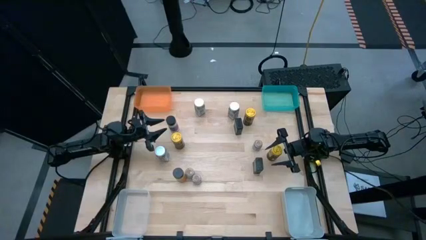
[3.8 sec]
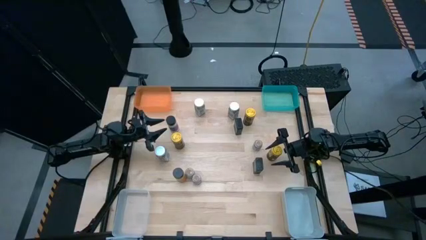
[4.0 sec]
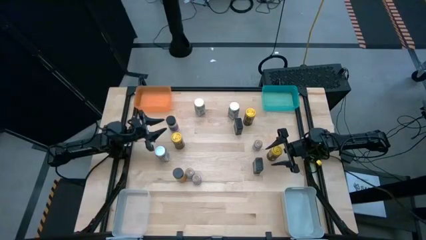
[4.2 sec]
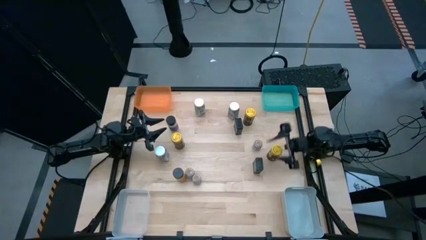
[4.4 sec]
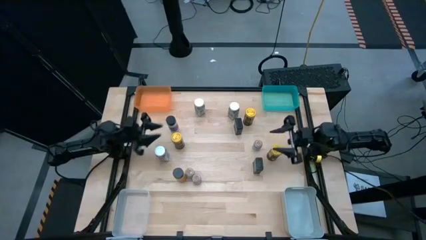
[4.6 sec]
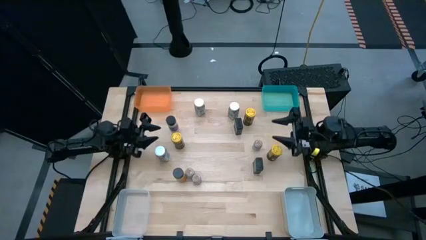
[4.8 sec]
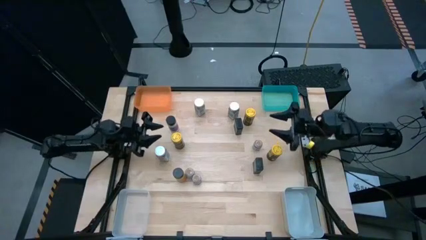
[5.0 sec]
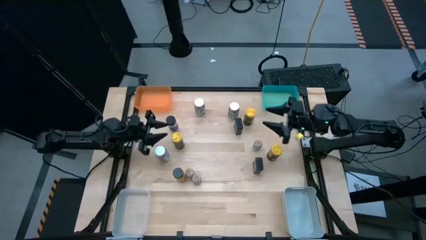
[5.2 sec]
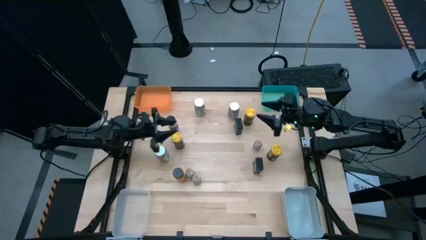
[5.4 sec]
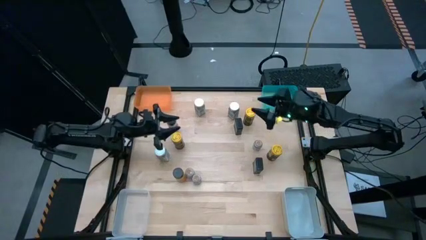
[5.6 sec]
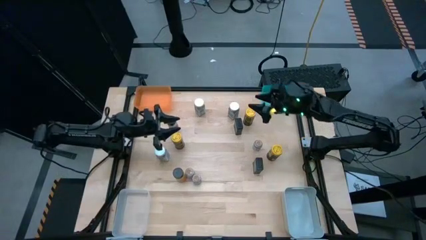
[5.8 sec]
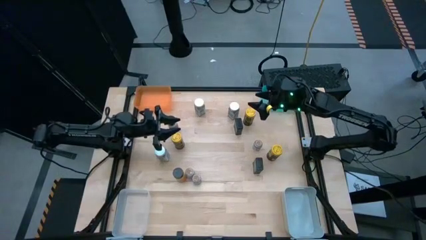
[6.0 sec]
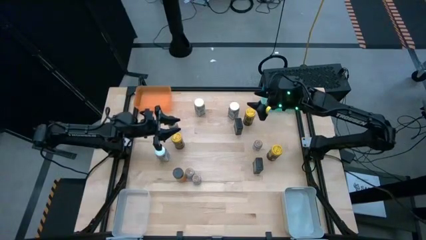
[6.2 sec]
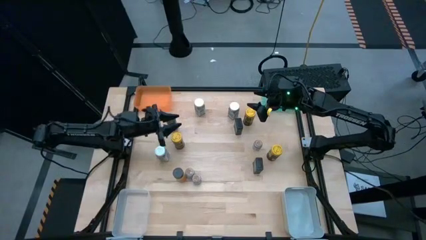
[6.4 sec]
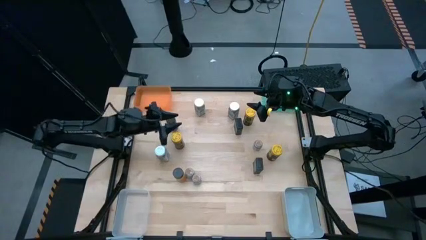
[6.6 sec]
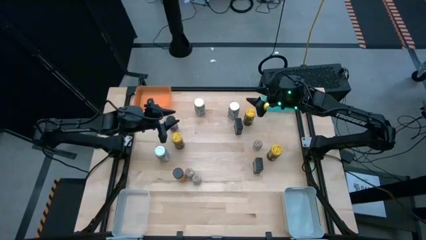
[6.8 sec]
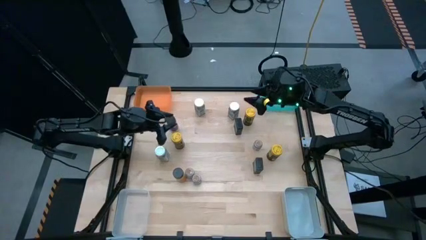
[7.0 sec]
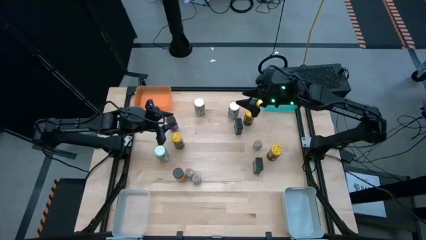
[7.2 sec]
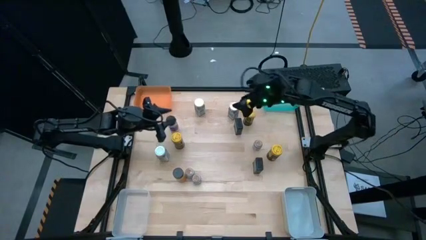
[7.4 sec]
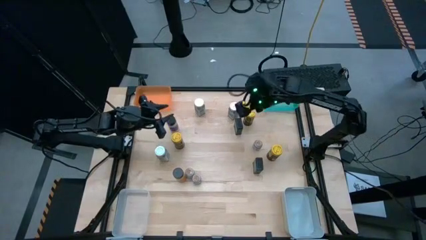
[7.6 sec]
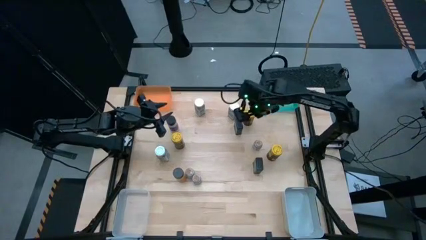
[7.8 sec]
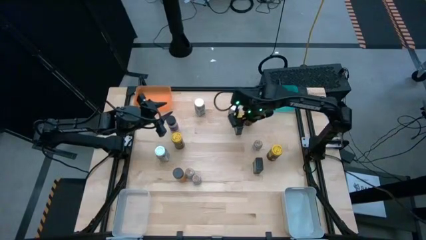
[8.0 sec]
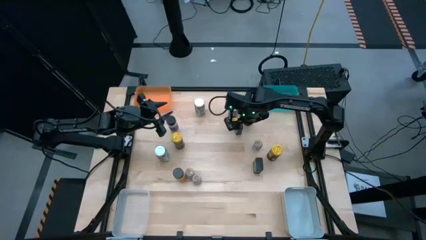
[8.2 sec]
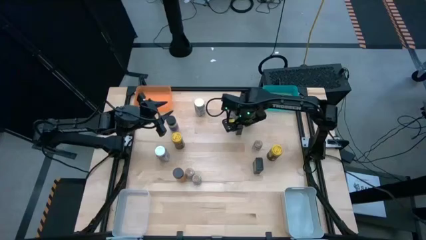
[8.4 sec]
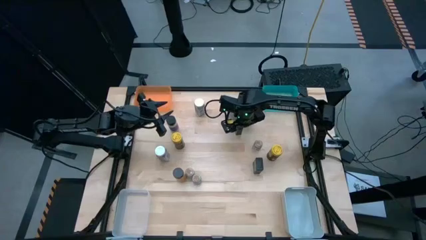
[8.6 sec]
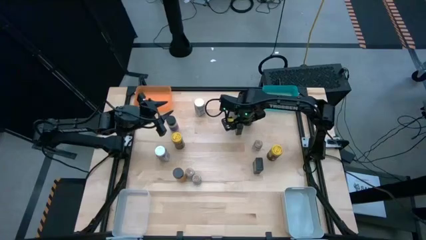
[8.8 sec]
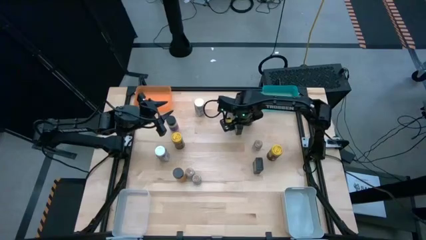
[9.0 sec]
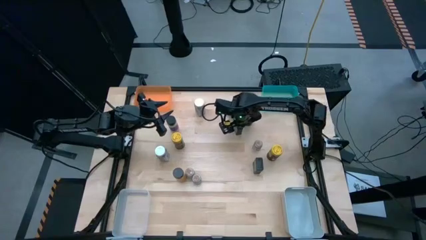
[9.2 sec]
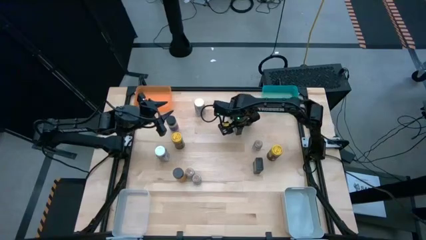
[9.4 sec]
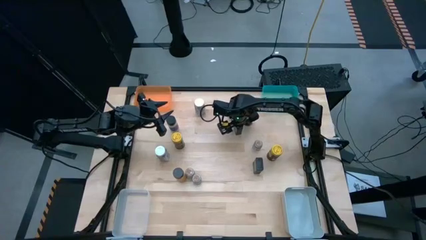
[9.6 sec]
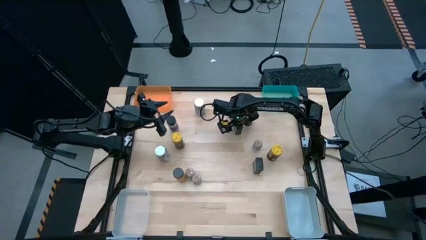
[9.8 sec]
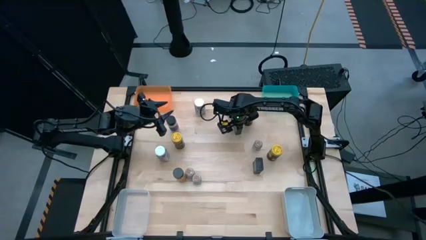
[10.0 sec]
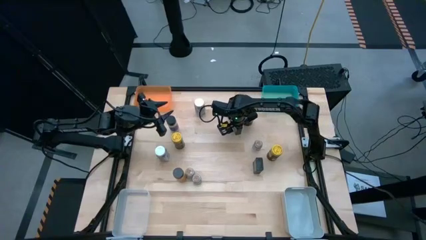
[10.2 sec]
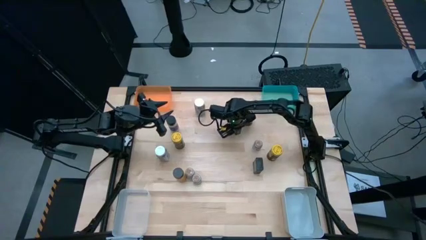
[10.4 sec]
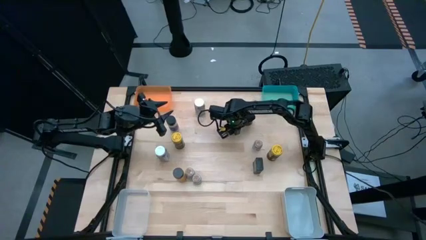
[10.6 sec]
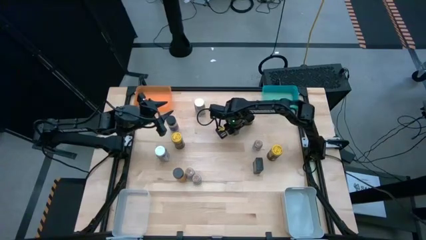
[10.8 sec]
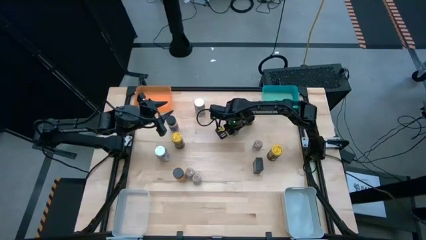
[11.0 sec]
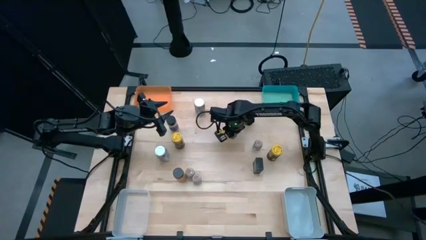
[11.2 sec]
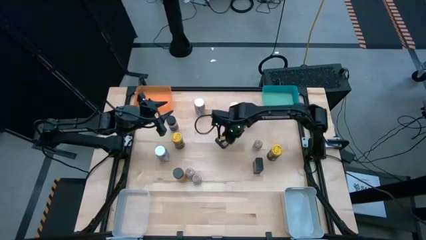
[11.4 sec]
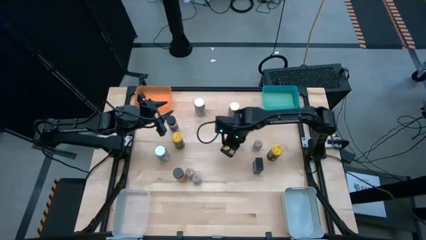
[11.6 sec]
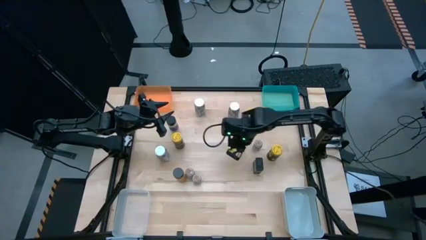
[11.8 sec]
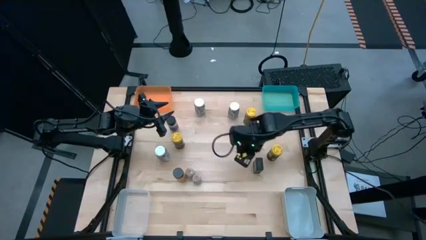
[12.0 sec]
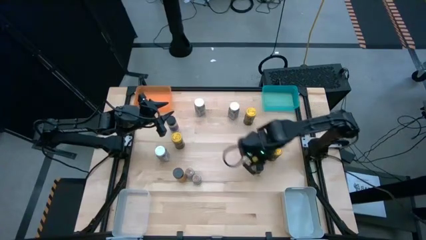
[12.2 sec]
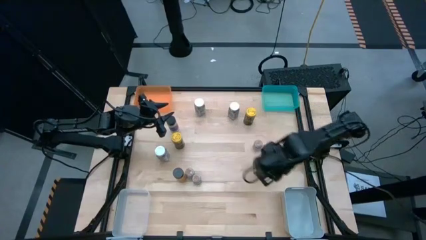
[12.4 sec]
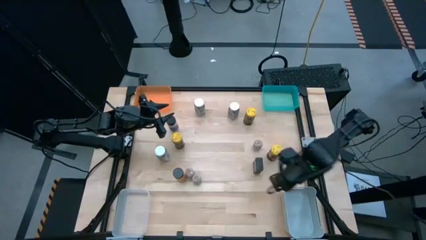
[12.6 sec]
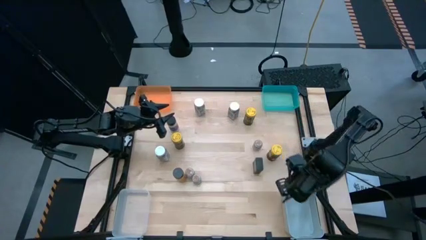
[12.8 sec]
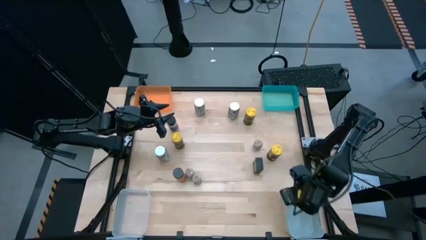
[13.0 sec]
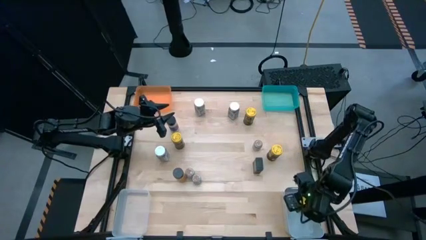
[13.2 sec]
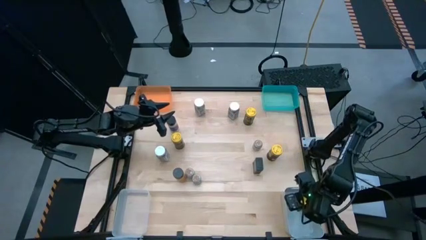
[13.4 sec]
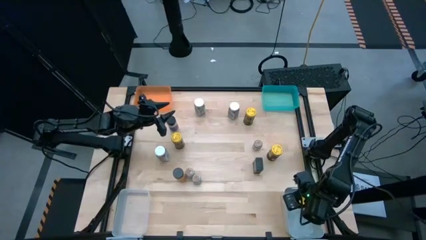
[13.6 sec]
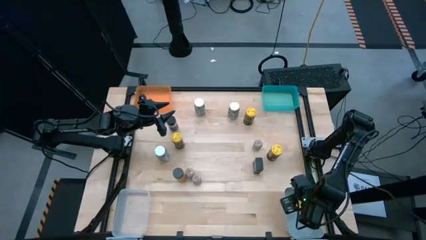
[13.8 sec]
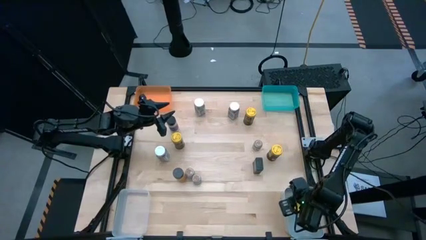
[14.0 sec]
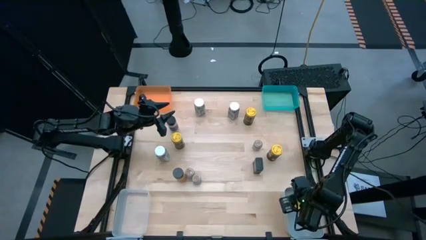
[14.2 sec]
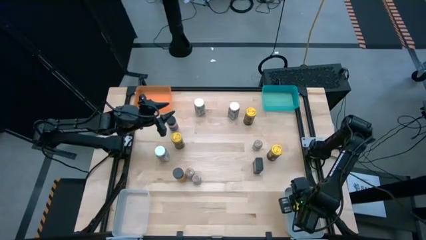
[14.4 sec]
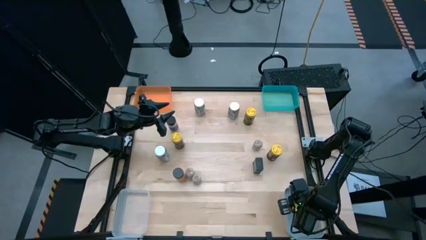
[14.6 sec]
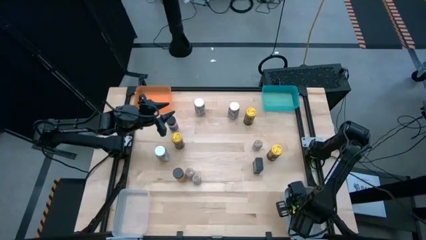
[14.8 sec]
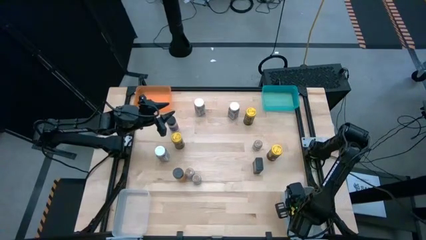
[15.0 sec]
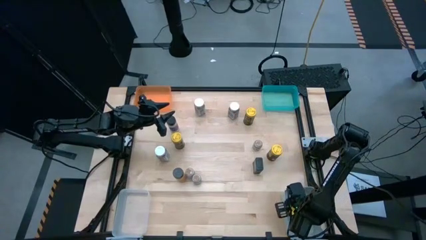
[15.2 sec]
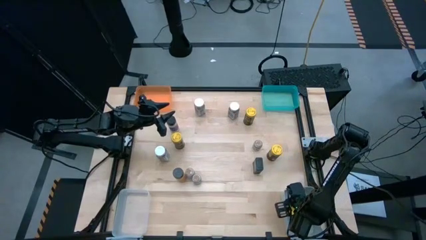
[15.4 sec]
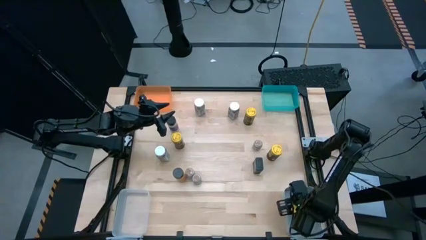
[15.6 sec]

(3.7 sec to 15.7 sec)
Task: Sort spices by type
Put the top black seasoning can into the gray bin

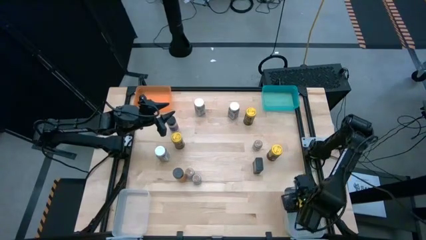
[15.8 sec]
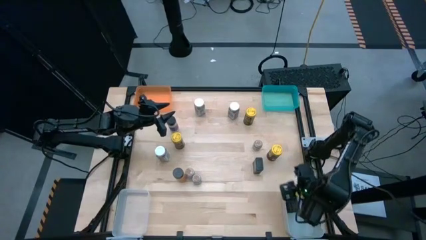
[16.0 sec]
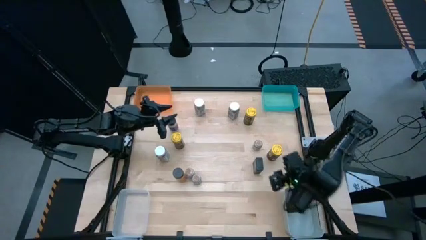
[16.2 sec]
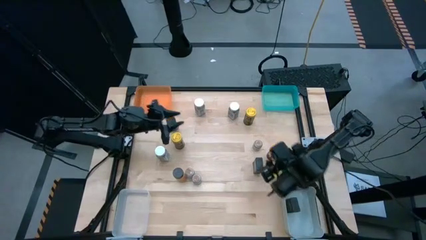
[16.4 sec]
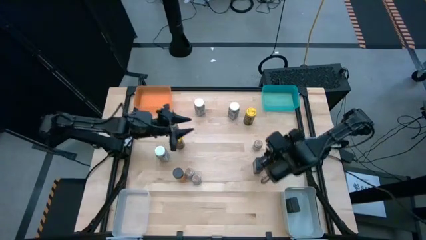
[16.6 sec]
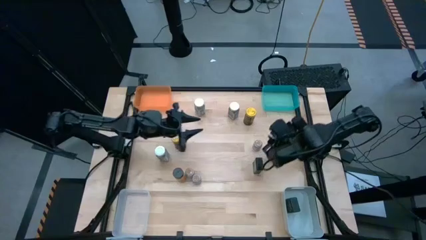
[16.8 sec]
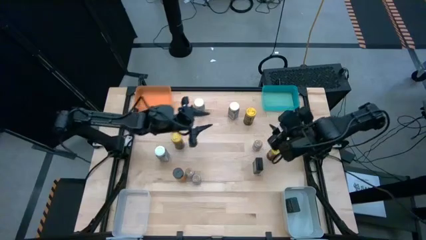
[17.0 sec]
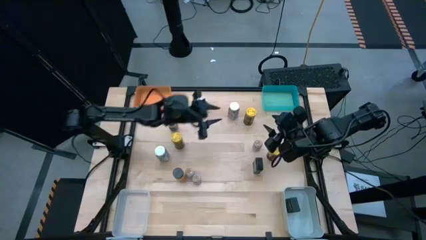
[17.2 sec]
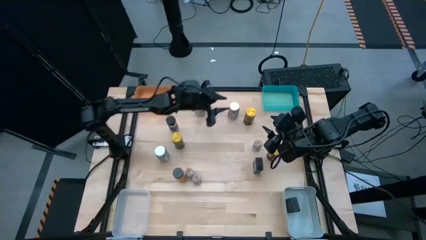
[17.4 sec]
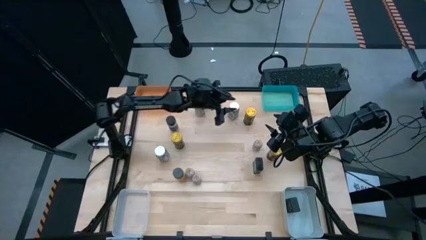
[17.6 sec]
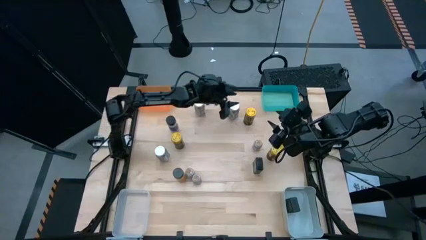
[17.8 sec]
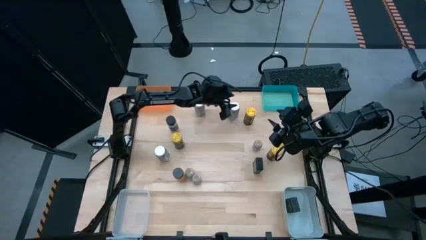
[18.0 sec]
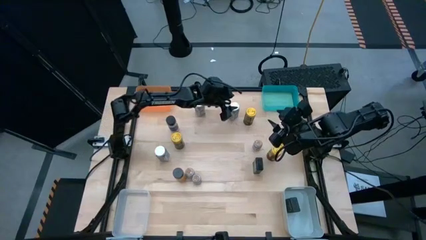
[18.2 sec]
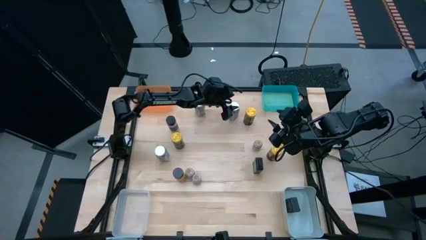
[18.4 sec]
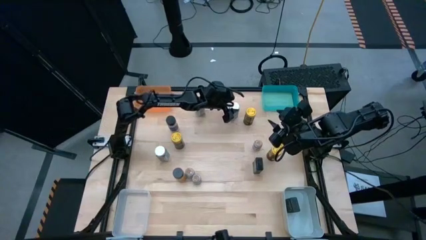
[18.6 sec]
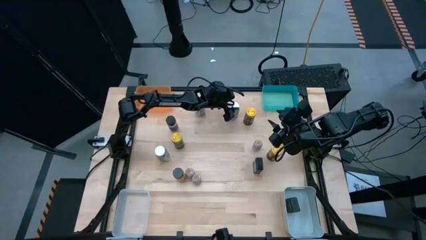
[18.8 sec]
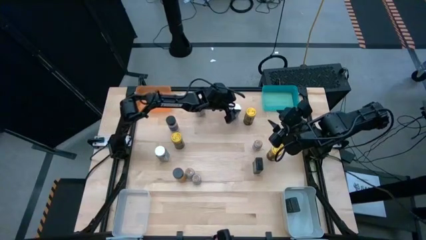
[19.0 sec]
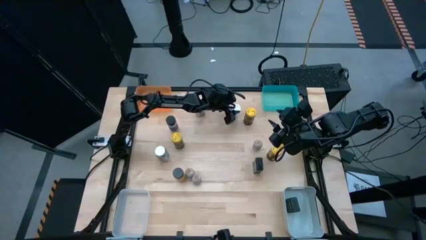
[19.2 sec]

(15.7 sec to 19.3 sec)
Put the top right white seasoning bottle into the orange bin
